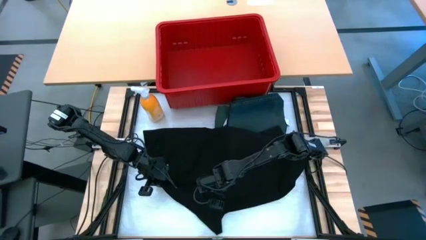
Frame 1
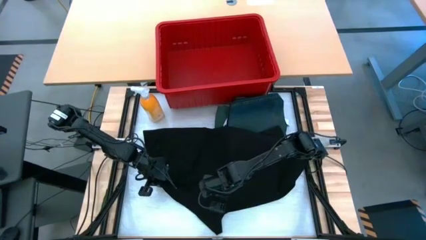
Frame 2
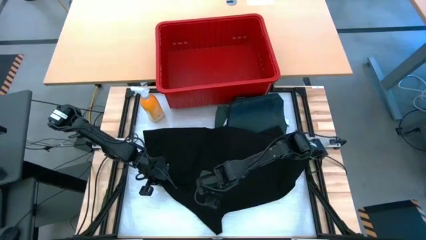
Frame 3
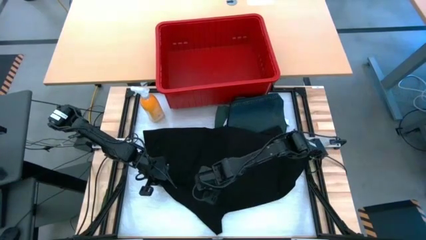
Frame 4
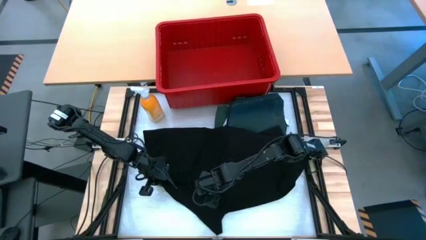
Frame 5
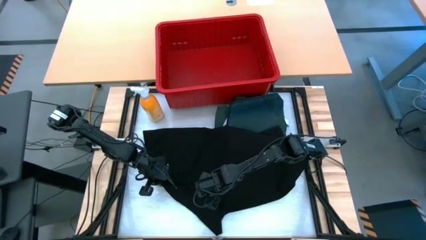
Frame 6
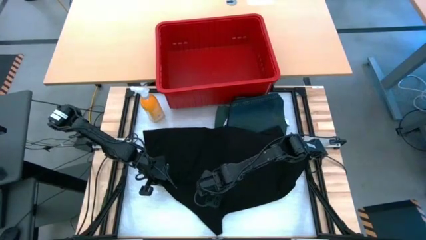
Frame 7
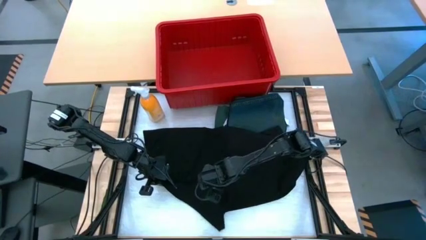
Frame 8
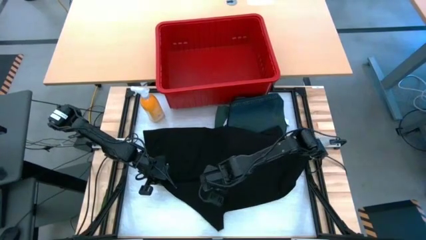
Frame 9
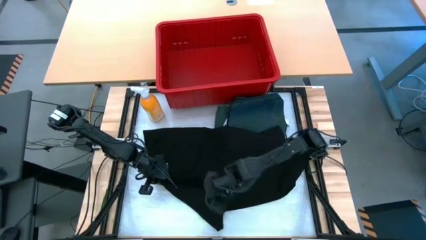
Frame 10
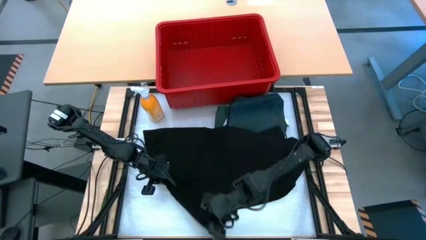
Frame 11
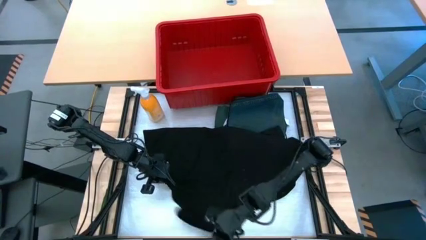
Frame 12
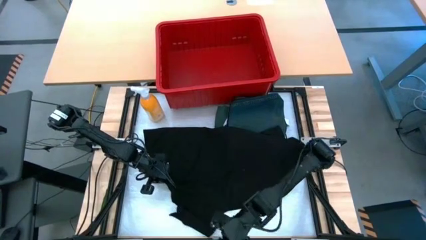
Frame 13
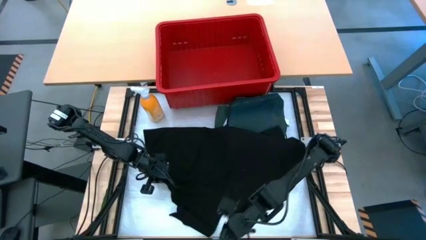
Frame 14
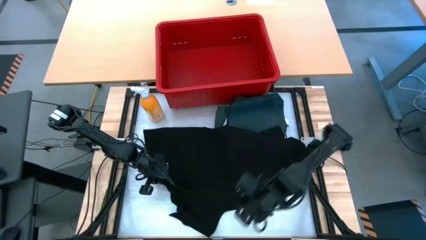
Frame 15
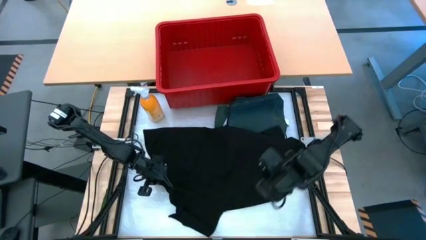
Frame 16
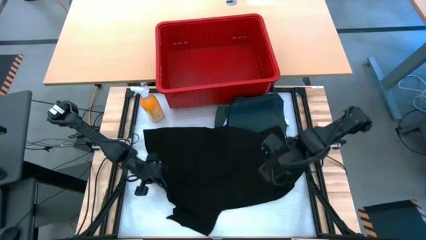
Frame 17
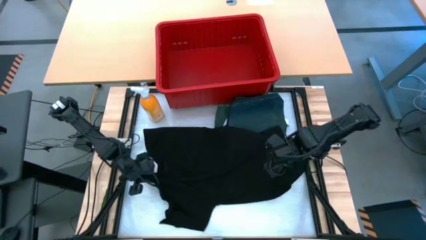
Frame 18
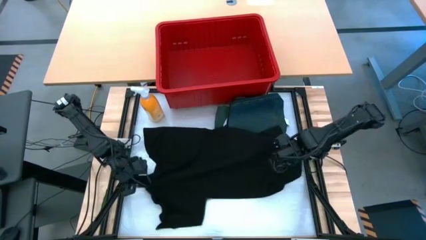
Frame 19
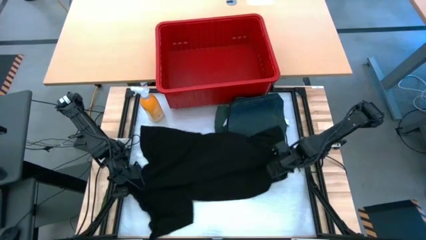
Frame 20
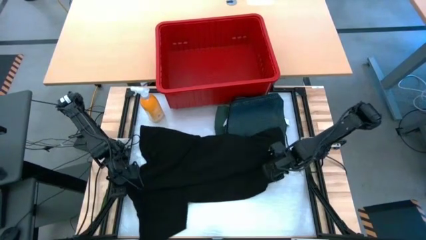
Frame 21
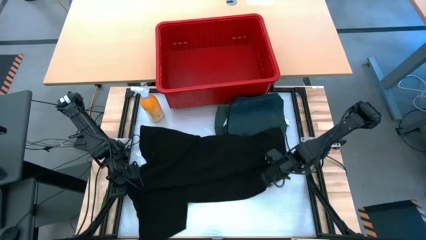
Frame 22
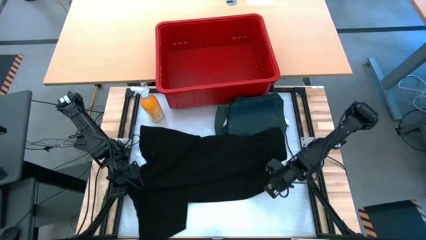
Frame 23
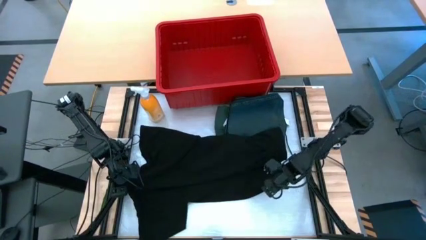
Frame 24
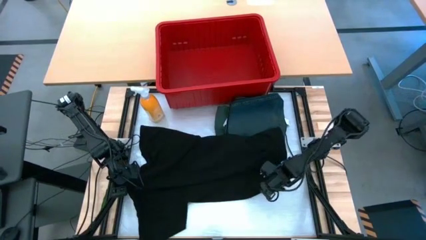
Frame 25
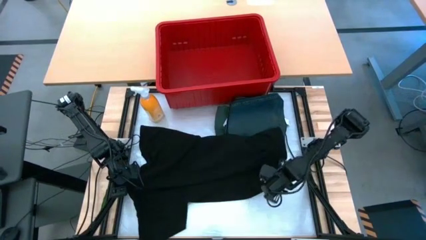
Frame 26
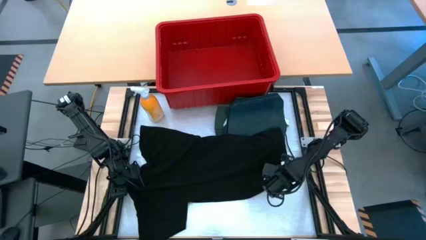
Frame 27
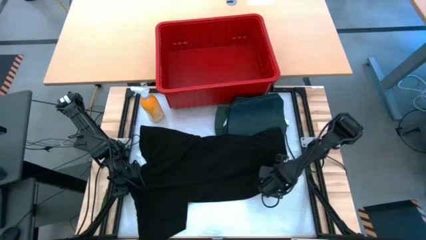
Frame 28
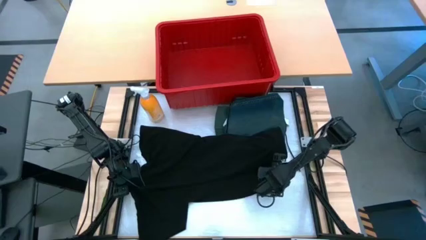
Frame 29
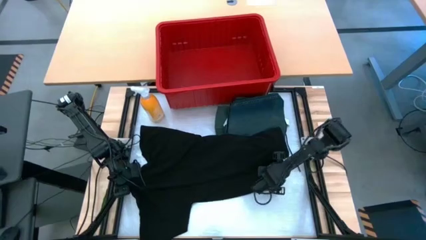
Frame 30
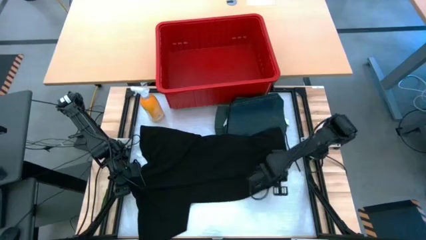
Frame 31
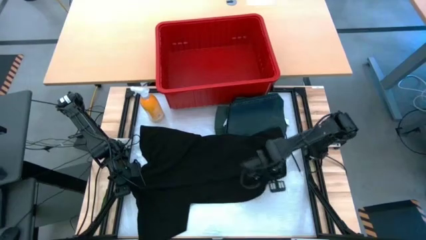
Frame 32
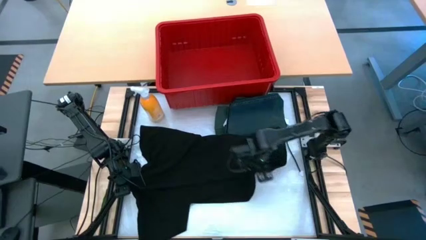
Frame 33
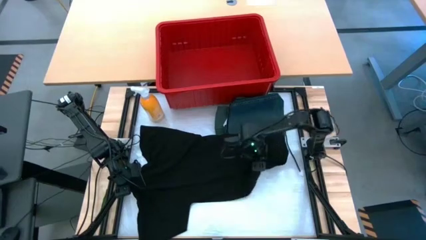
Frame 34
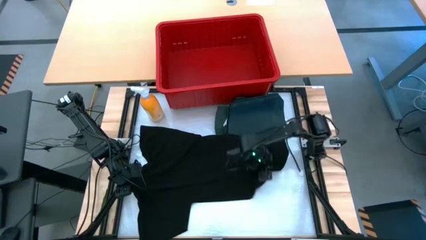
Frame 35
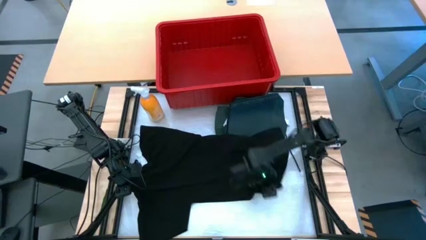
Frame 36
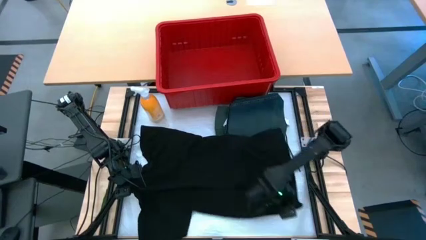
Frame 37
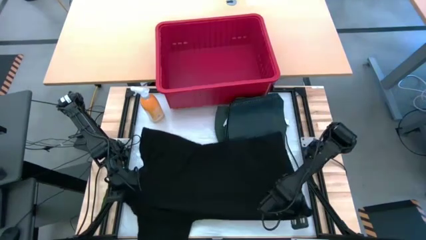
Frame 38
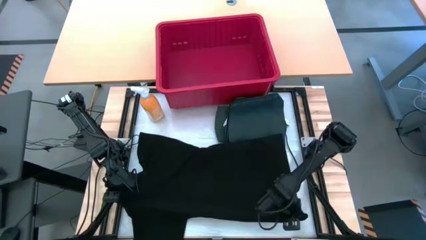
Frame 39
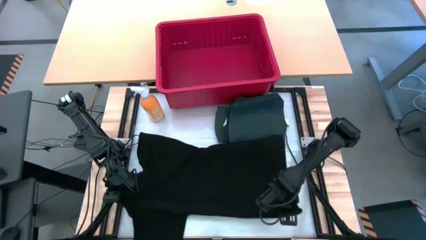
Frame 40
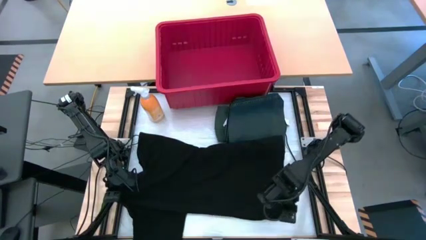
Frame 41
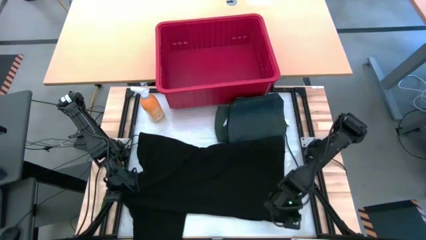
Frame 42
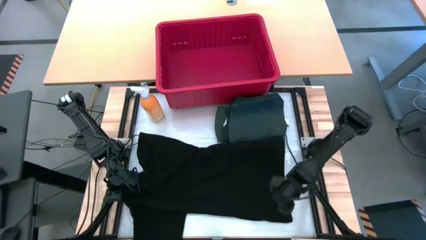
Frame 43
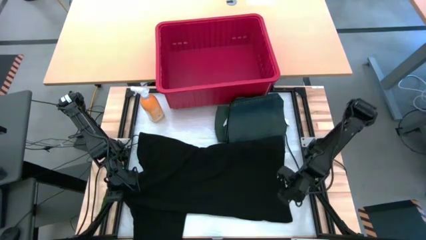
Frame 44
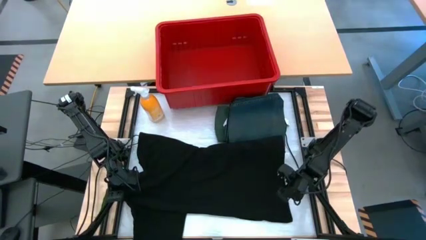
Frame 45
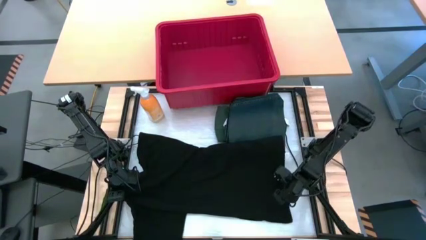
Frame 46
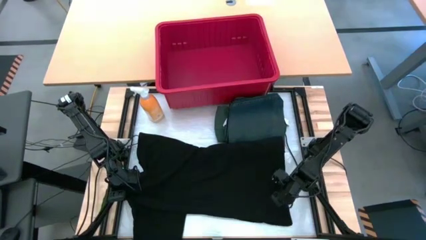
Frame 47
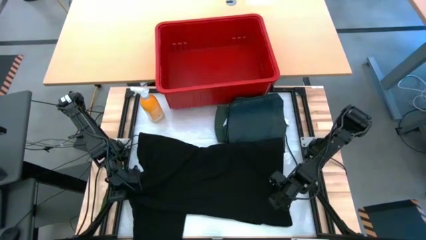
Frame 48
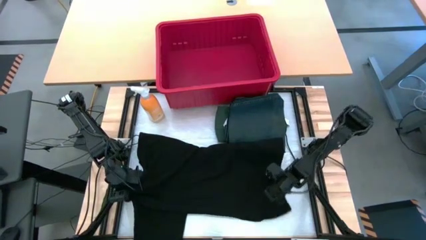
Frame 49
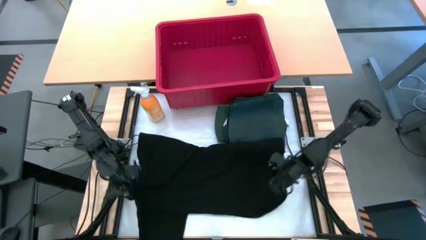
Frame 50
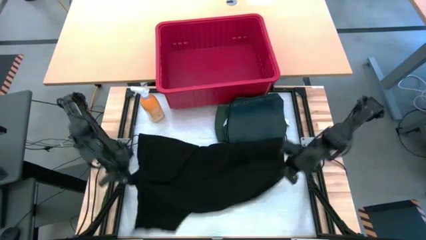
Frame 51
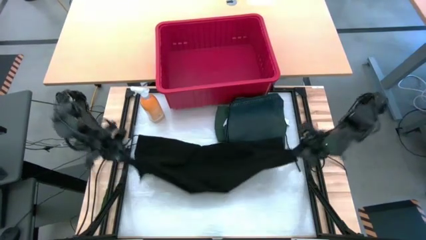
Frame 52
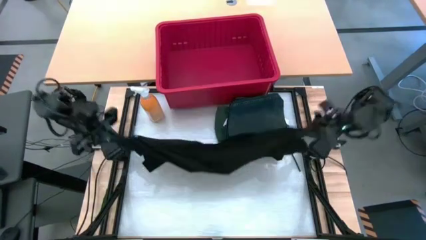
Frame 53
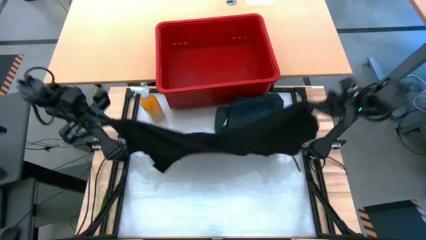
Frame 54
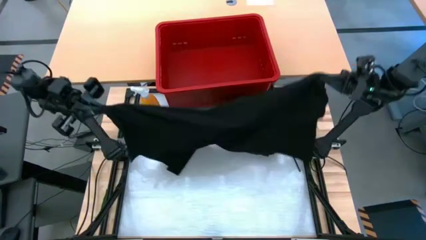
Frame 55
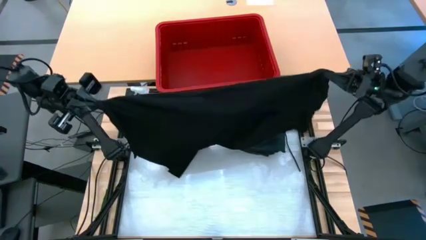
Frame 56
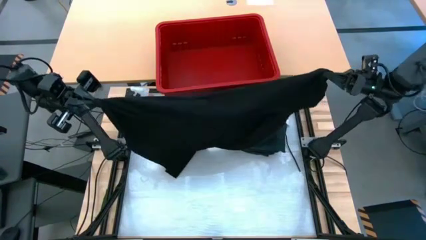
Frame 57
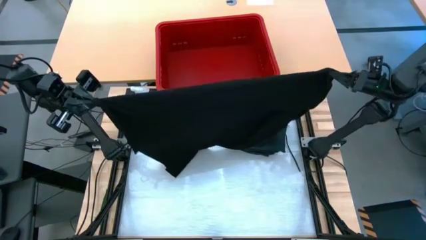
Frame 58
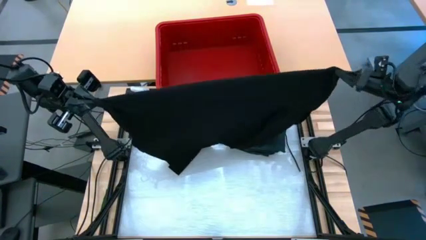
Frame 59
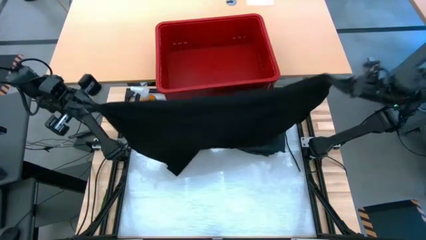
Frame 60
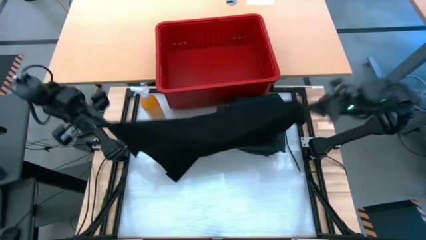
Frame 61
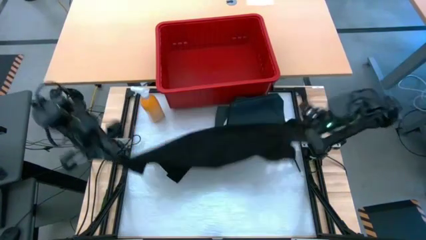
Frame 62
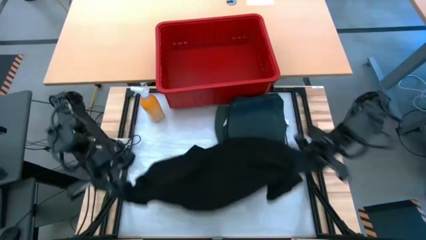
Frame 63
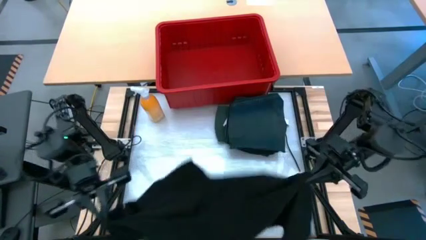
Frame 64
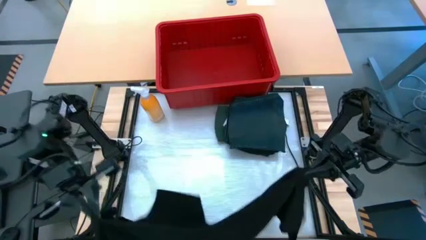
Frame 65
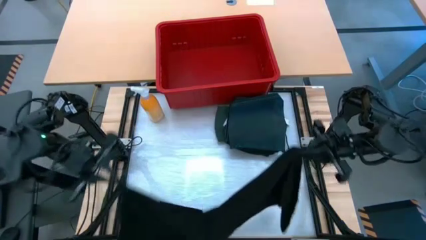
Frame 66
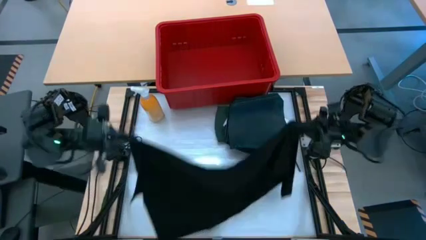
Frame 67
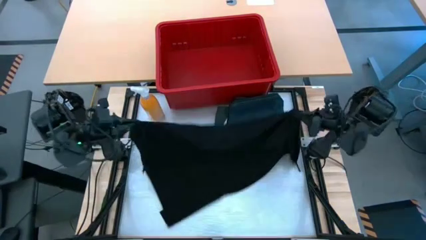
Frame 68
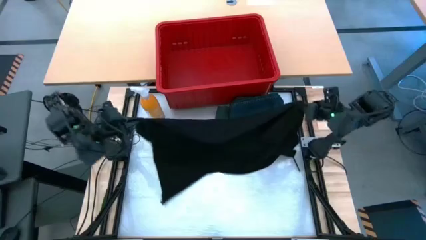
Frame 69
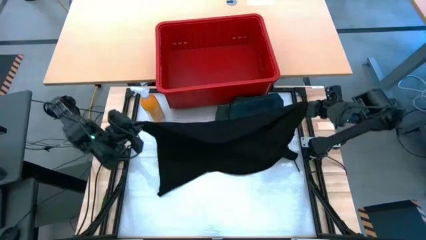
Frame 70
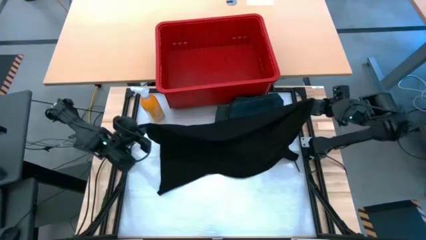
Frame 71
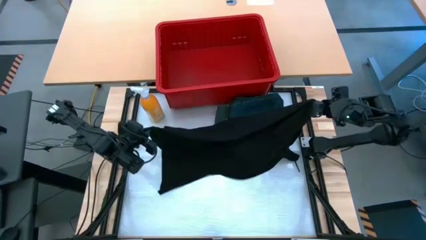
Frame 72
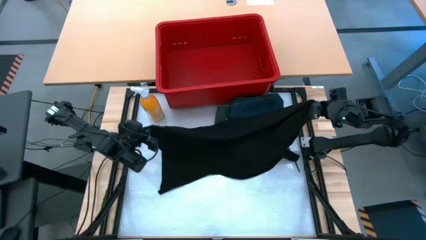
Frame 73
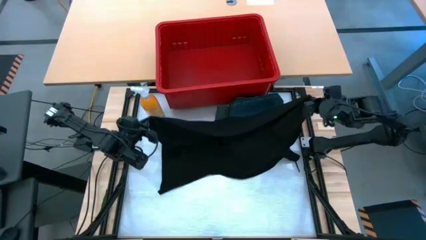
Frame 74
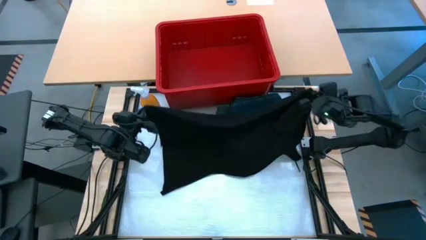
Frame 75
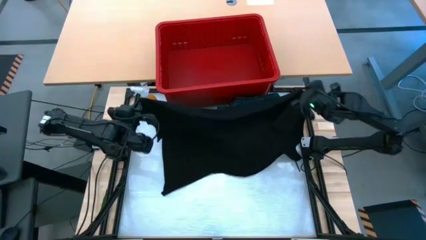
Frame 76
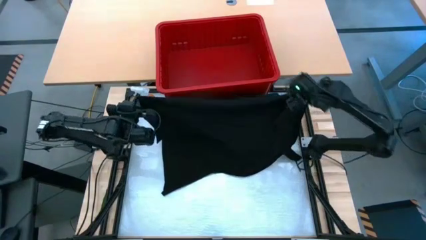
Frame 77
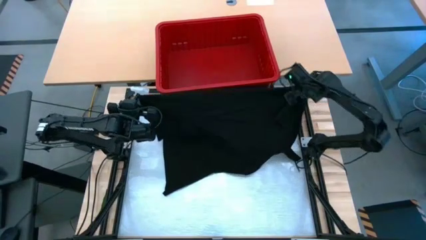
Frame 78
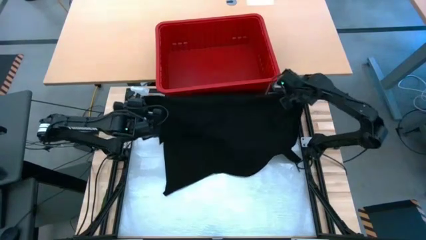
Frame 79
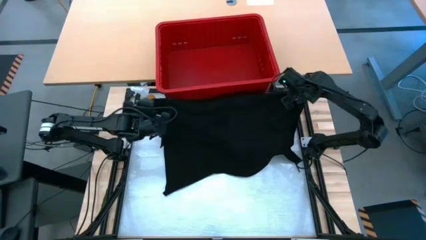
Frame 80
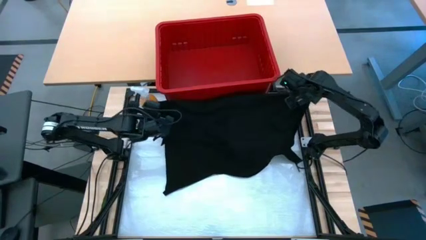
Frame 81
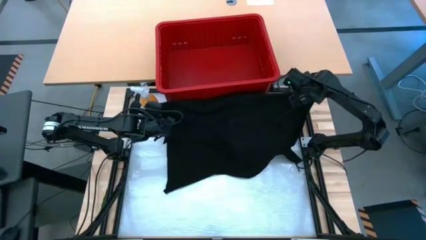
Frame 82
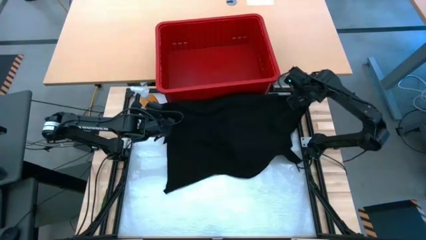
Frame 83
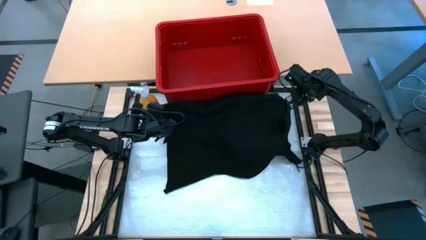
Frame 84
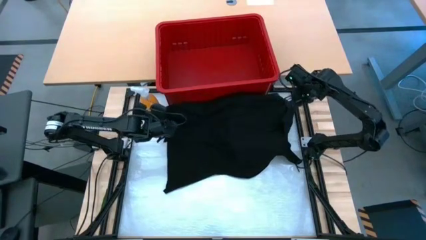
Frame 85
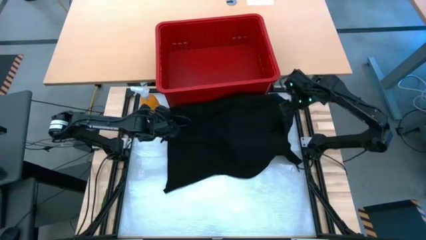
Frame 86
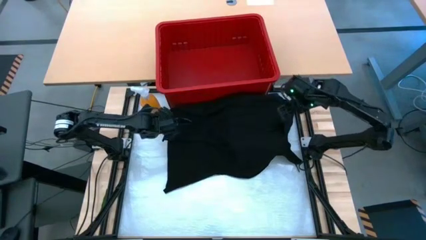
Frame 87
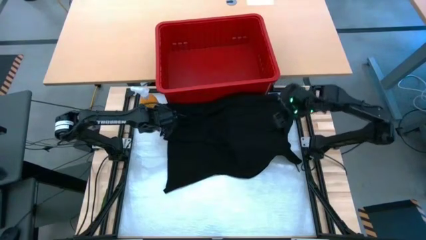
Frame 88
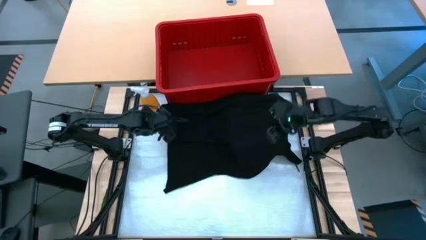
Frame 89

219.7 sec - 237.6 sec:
Task: Fold Laundry from Bin
Fold the black shirt from the red laundry bin
